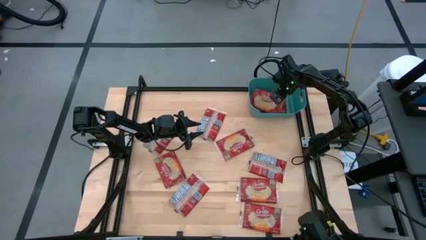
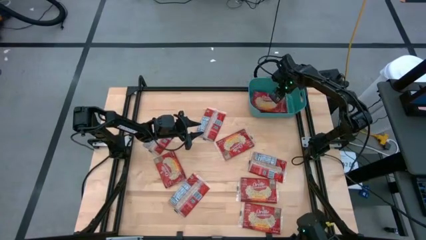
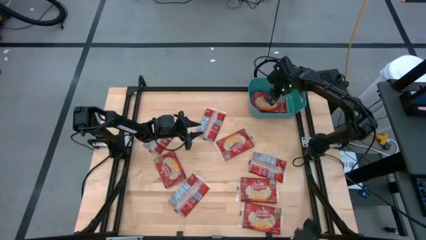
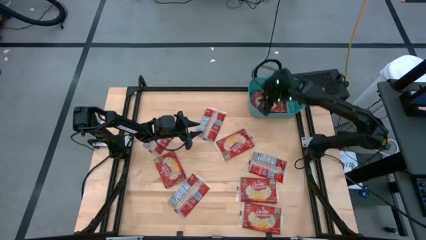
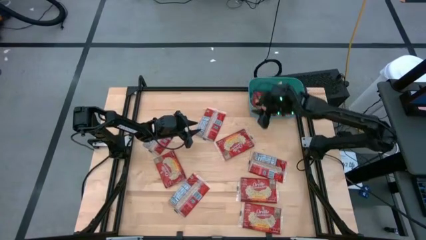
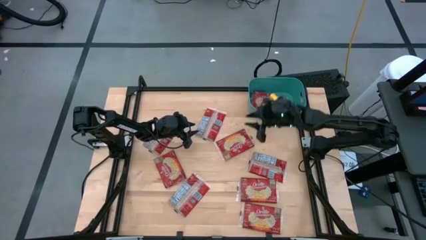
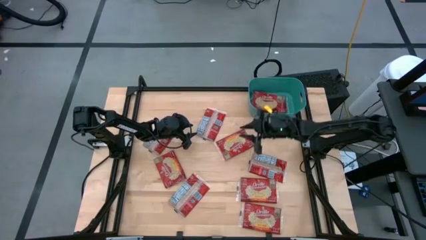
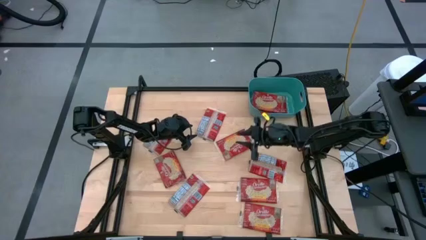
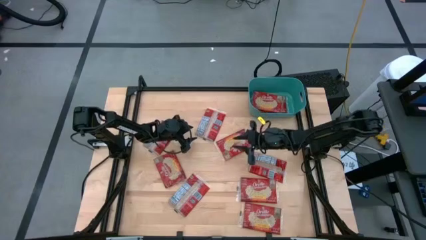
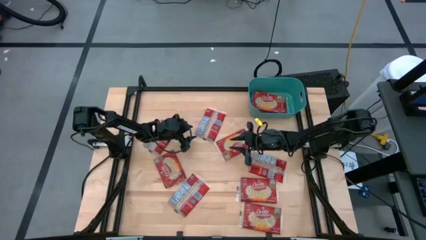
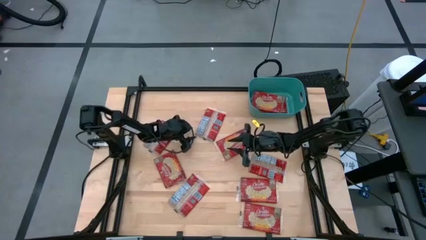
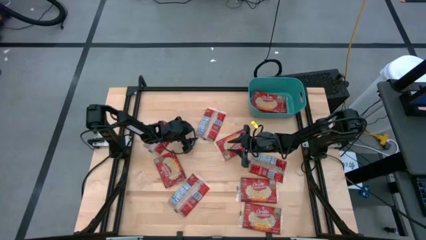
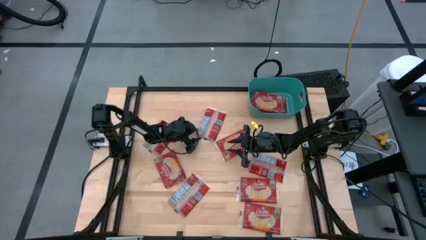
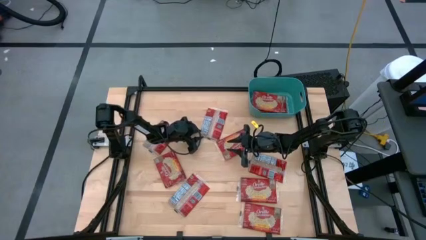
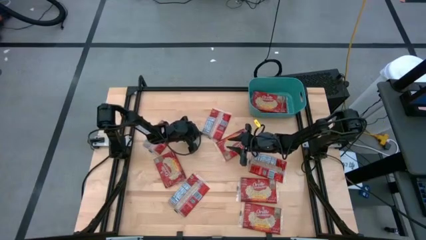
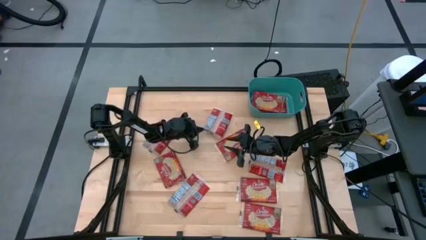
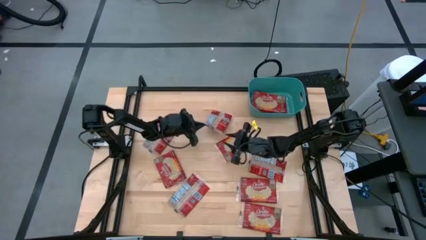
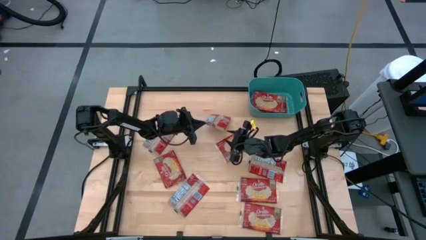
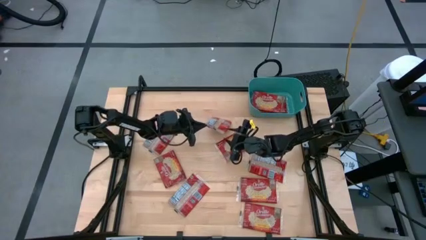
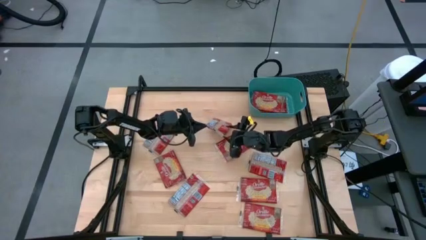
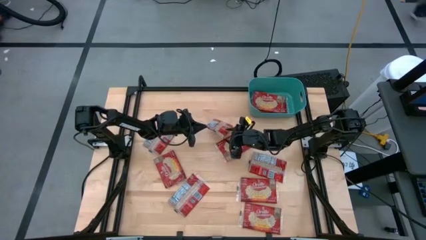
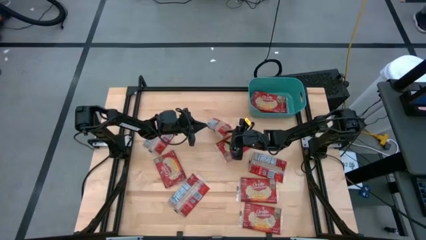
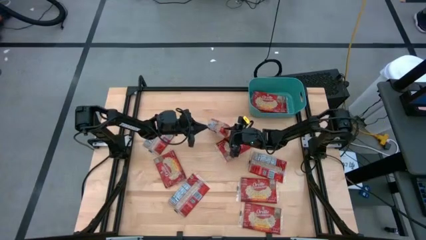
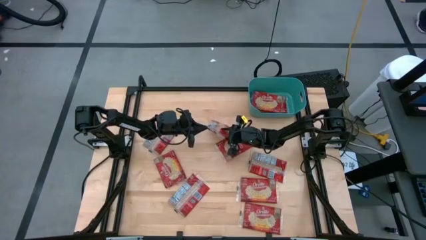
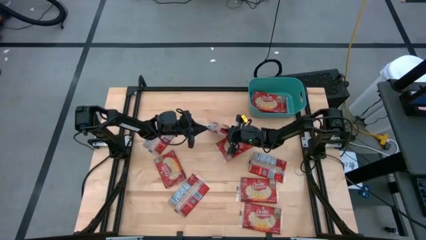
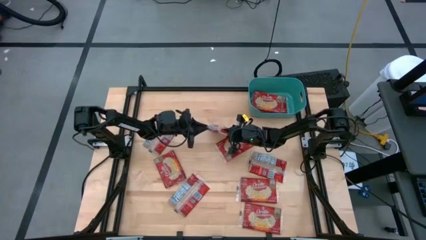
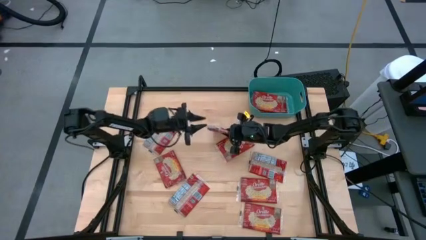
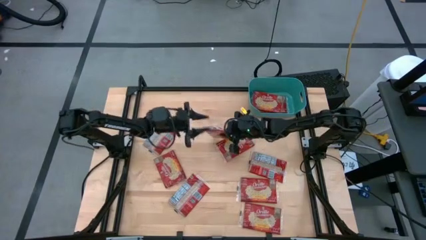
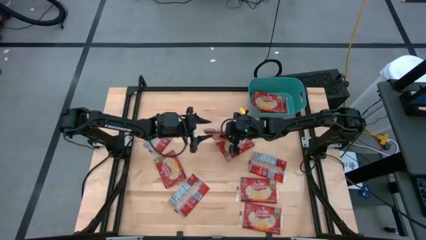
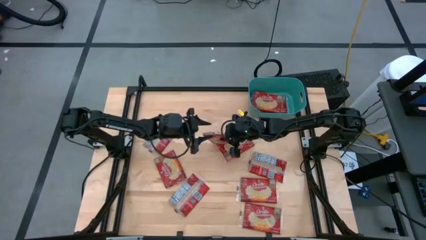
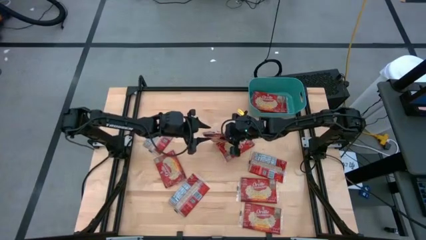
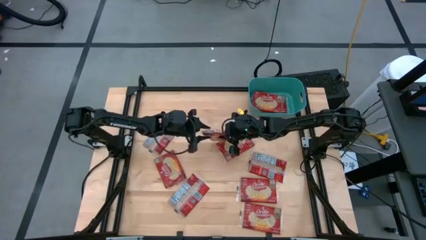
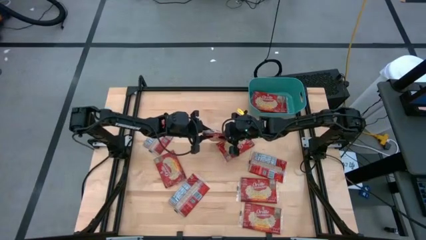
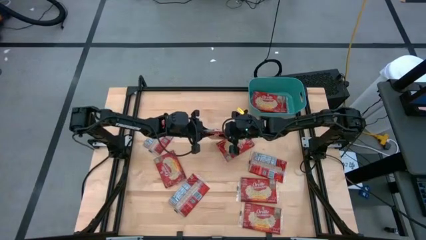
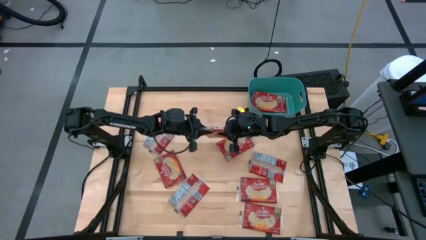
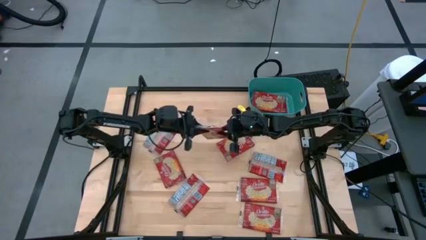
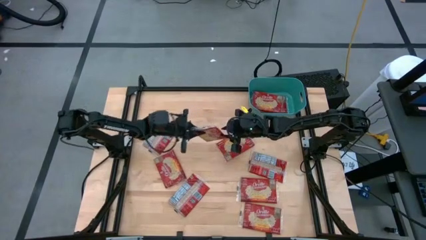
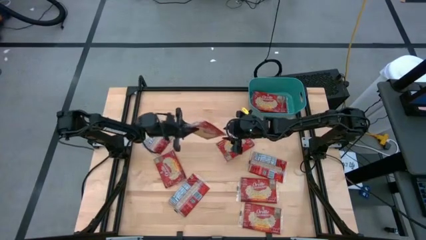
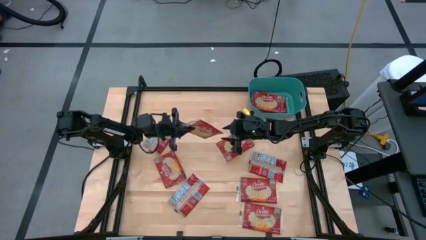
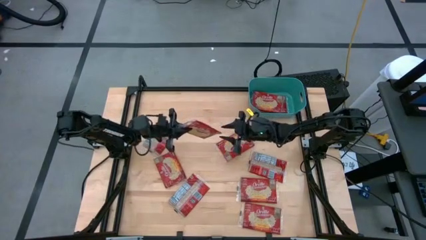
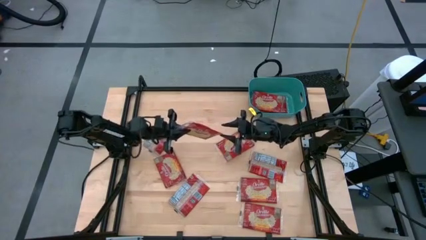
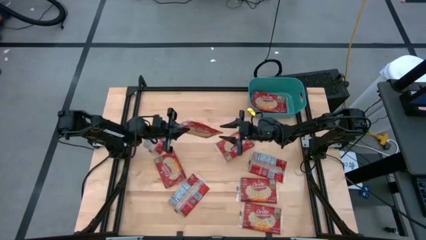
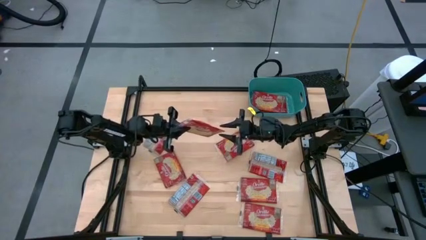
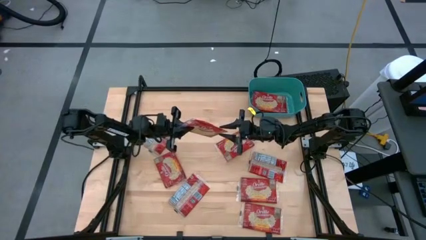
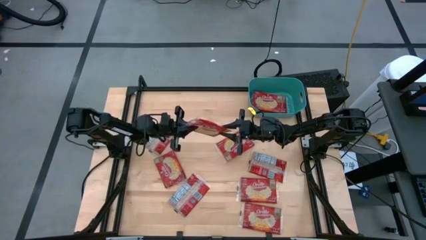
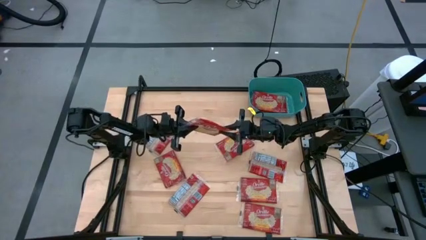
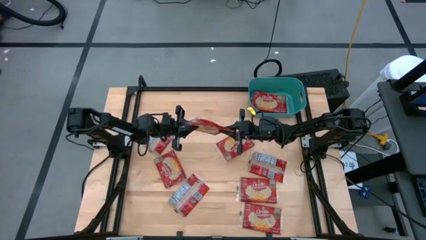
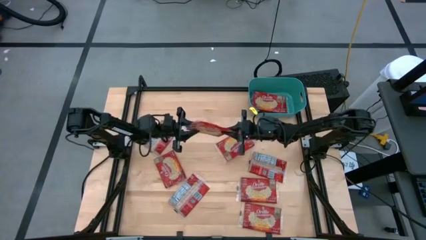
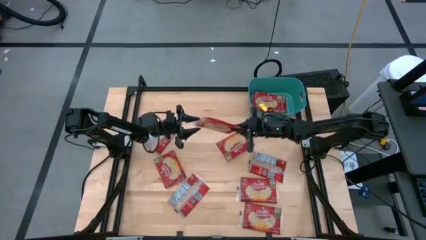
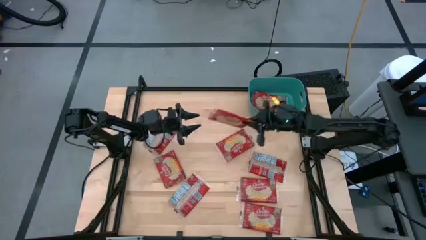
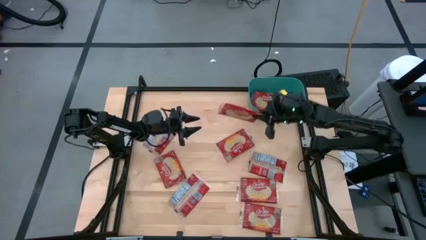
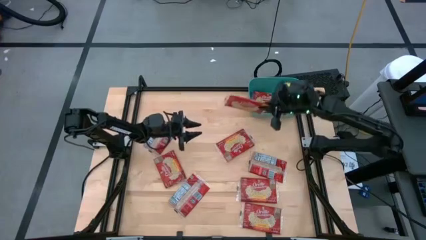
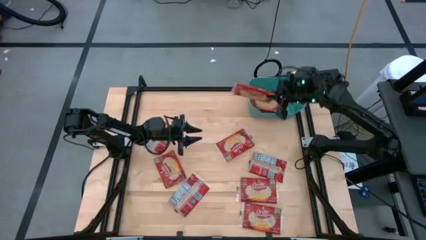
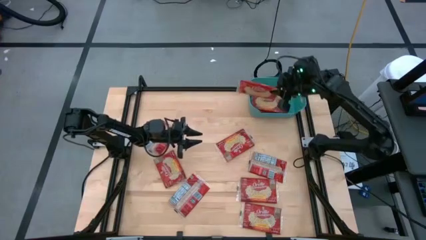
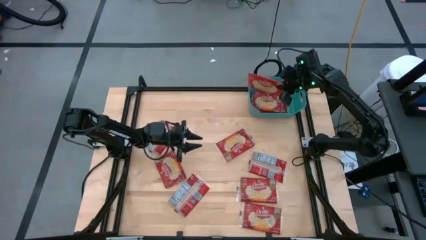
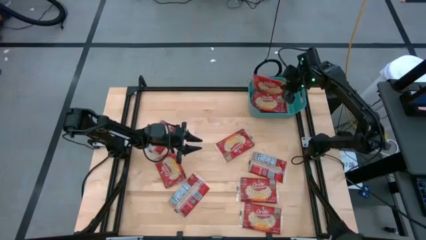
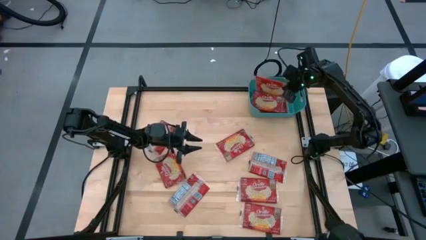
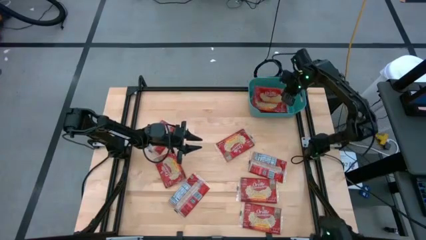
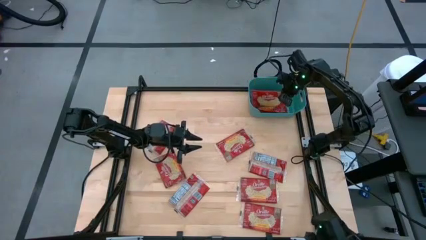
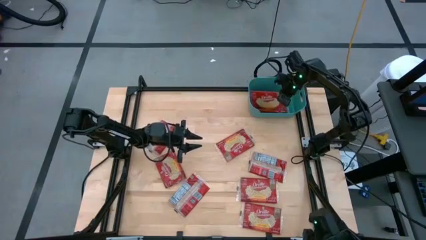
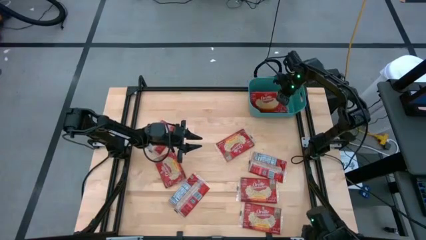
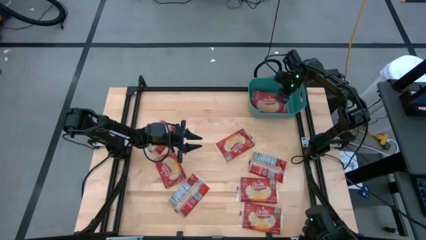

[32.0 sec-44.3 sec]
Task: Sort popcorn bags into baskets
Put the red popcorn bag into the blue bin

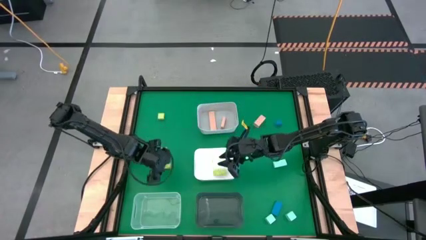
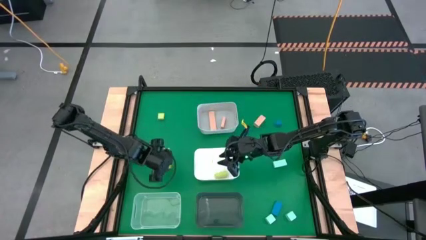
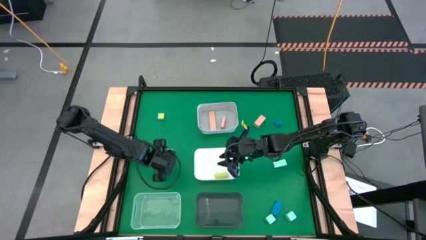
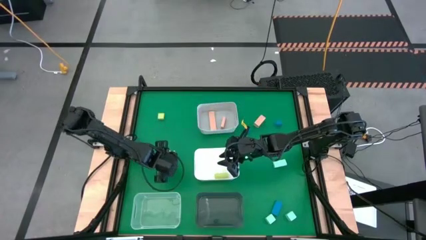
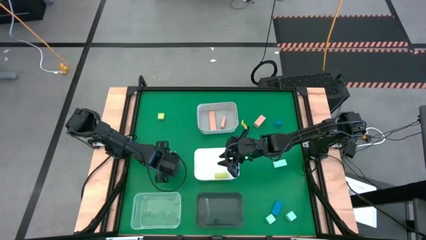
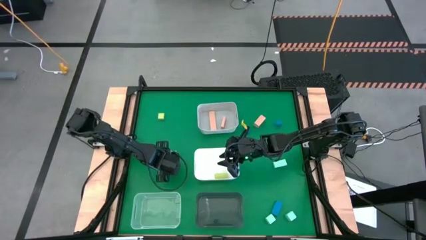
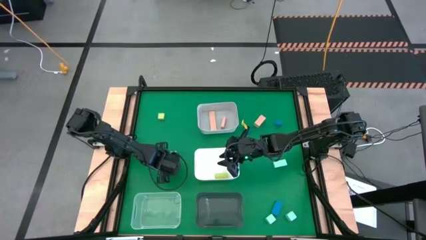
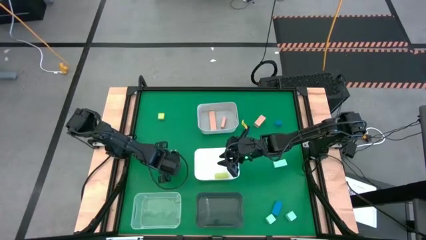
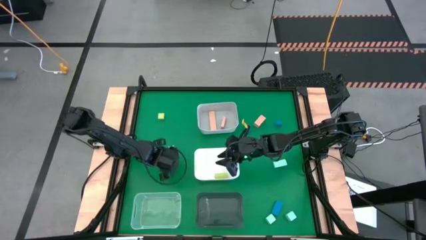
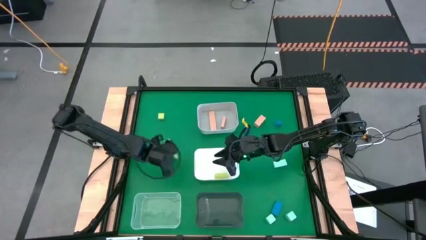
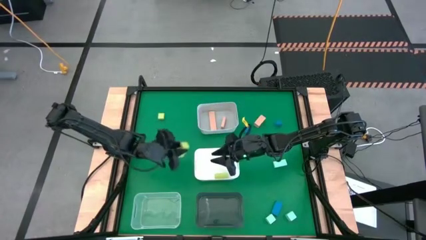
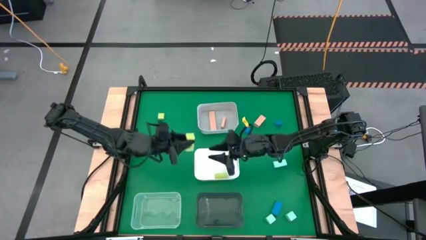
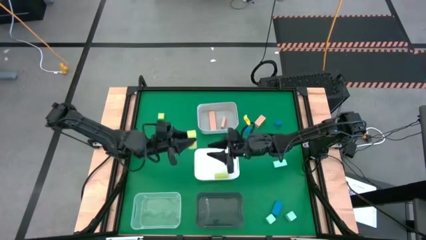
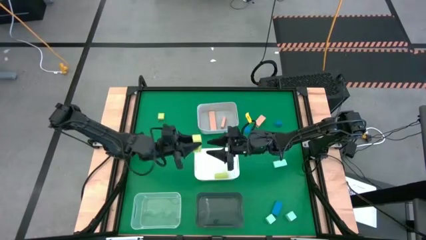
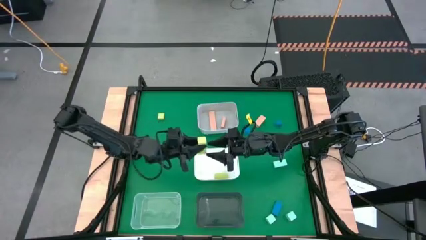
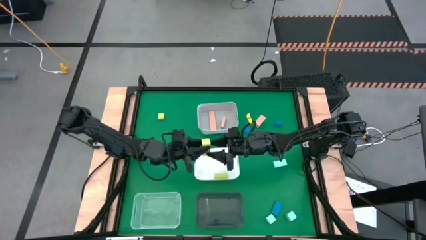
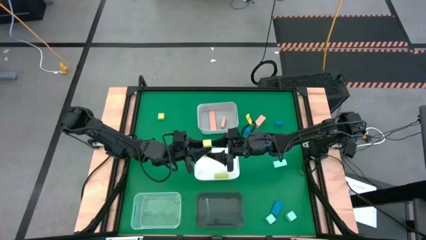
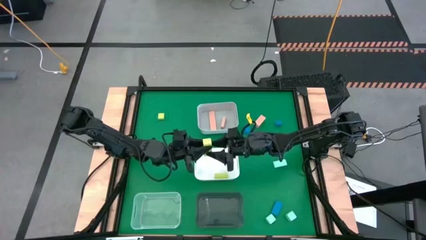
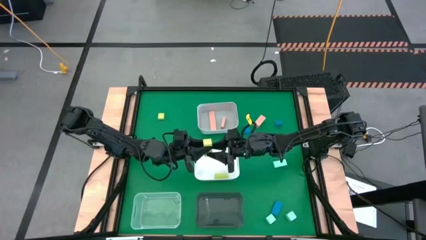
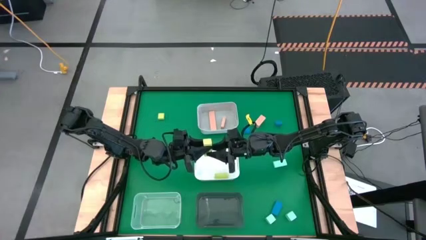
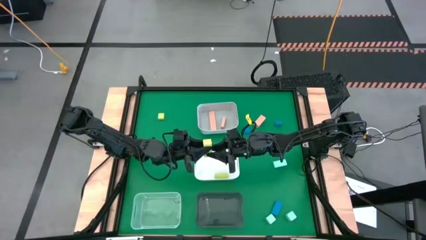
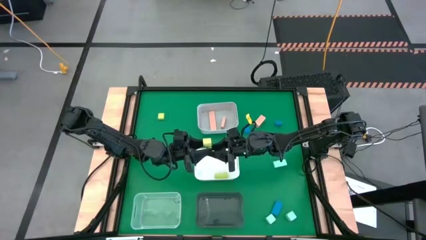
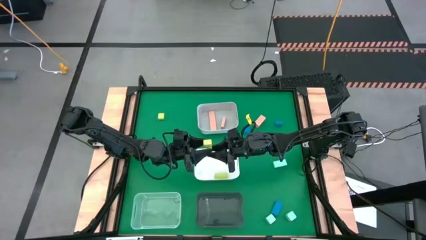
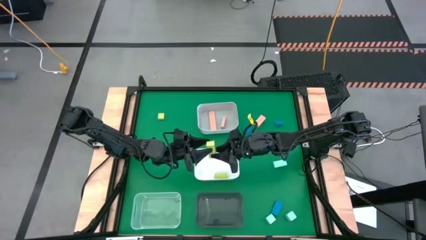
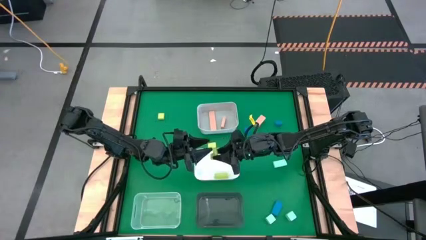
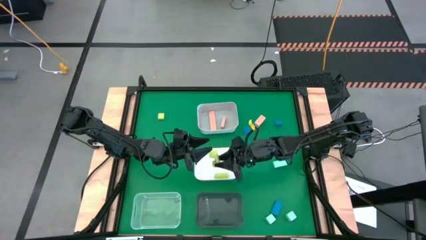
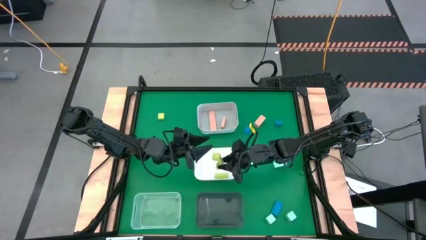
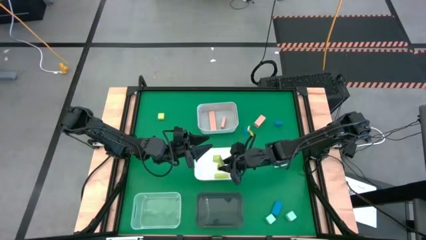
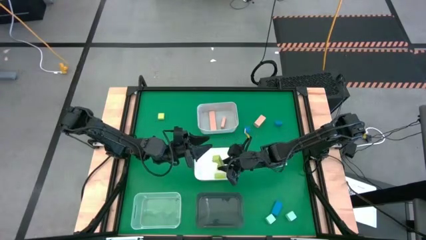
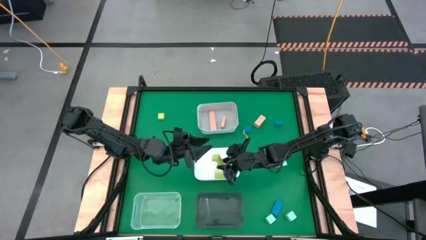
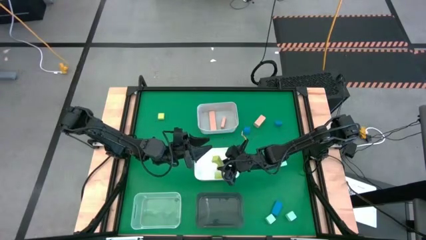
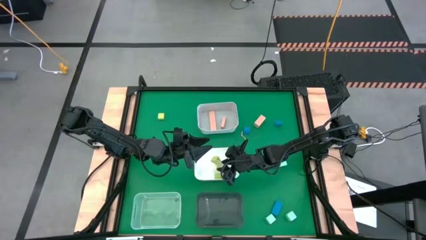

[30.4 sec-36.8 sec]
Task: Sort & place blocks by color
Put the bottom green block into the white bin
